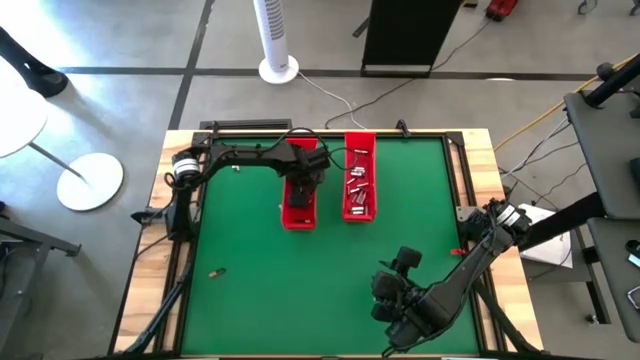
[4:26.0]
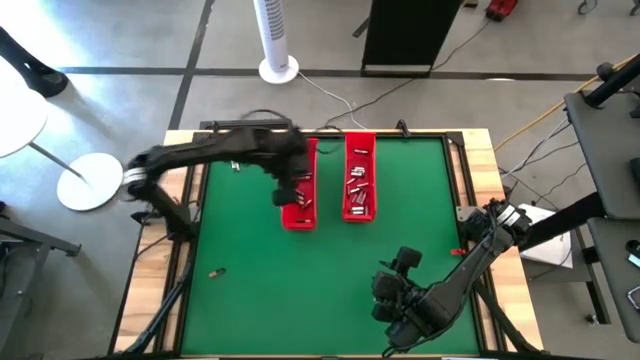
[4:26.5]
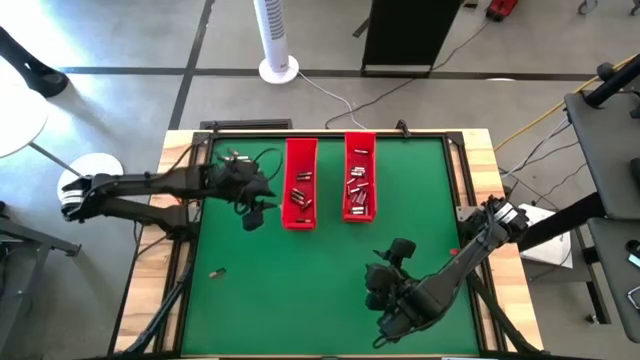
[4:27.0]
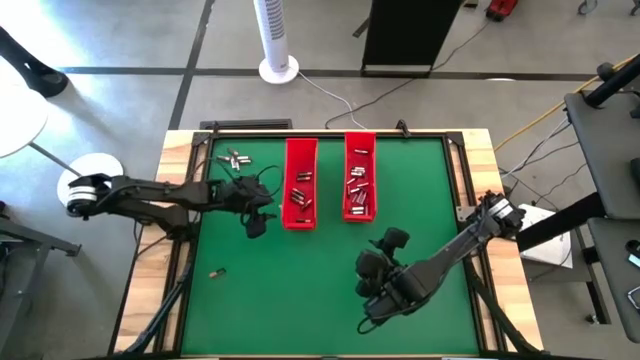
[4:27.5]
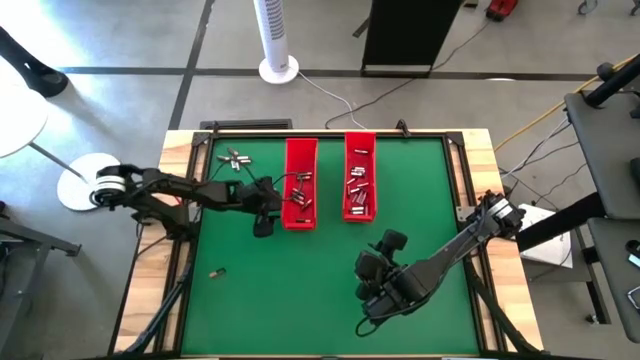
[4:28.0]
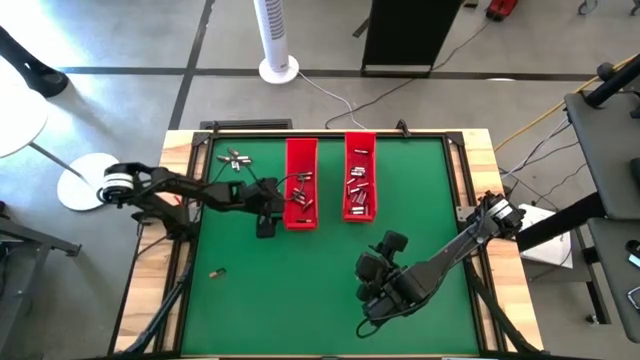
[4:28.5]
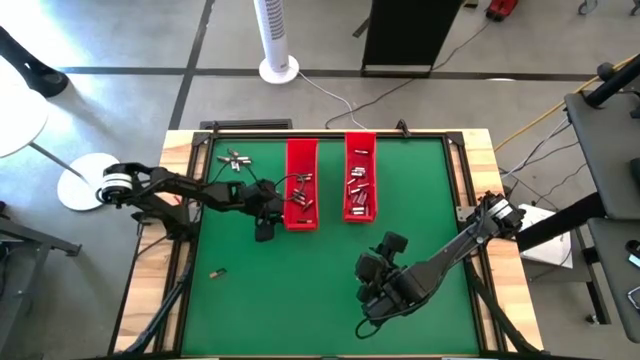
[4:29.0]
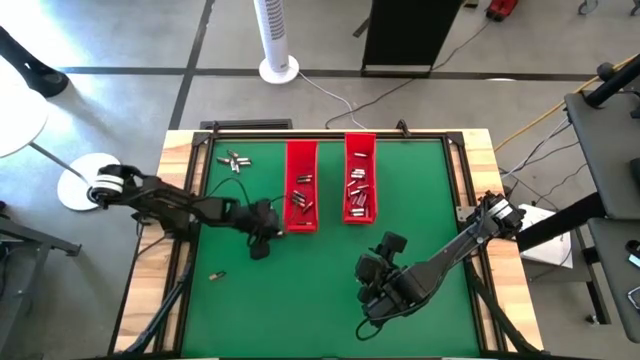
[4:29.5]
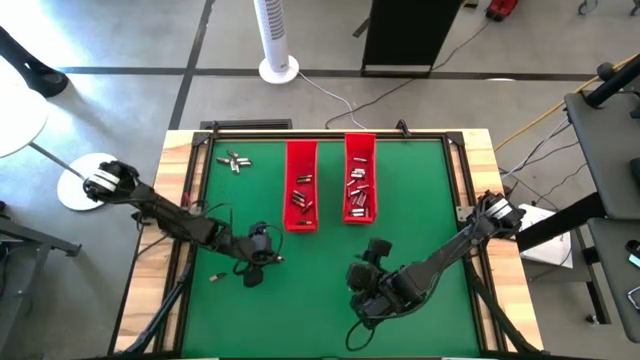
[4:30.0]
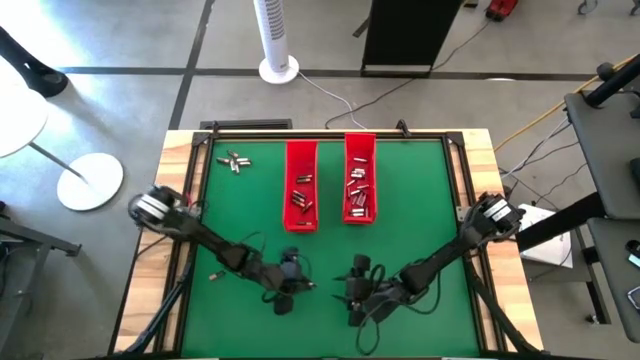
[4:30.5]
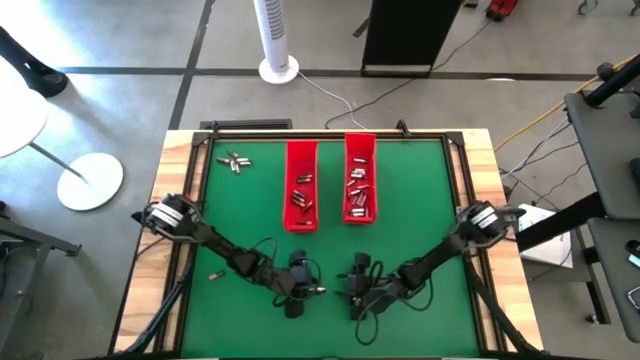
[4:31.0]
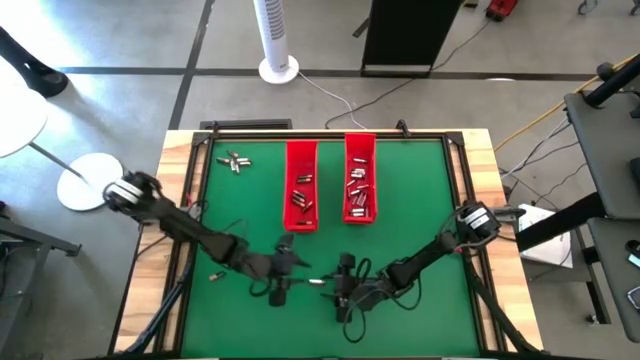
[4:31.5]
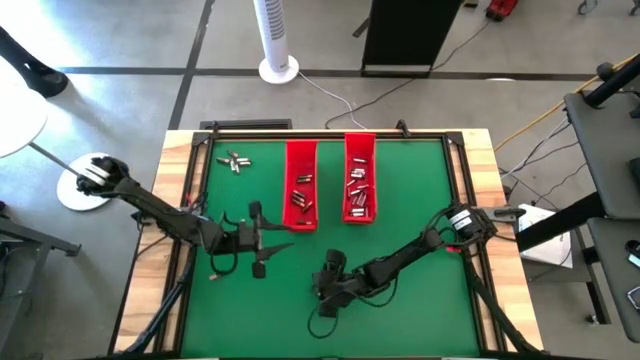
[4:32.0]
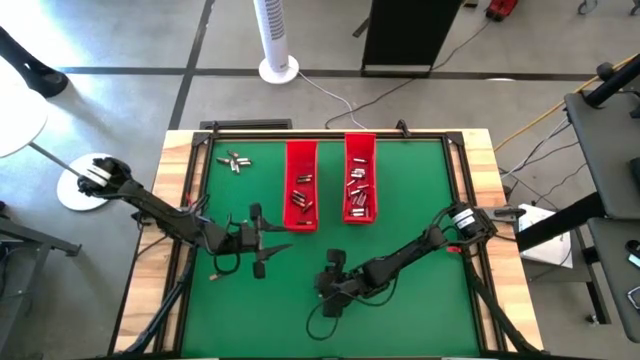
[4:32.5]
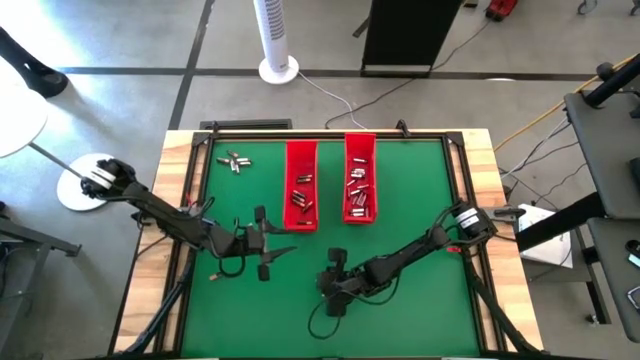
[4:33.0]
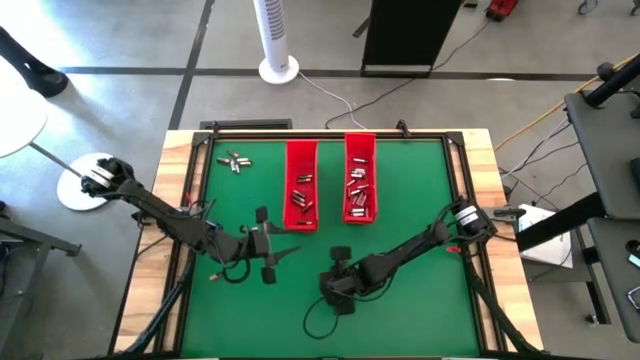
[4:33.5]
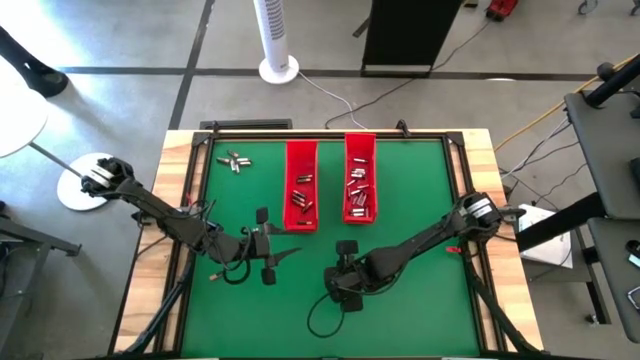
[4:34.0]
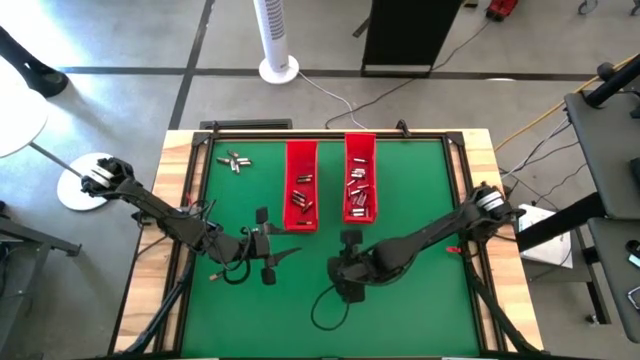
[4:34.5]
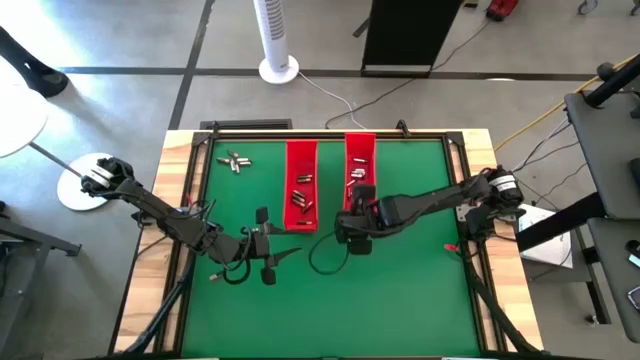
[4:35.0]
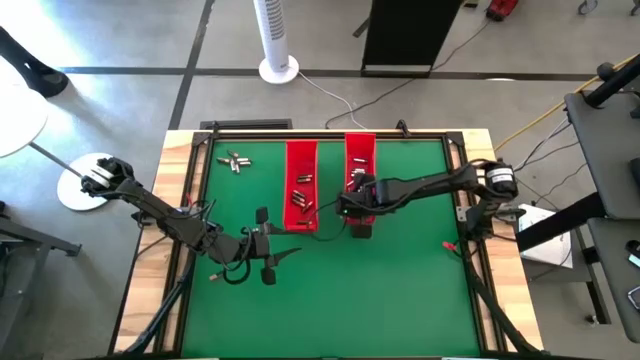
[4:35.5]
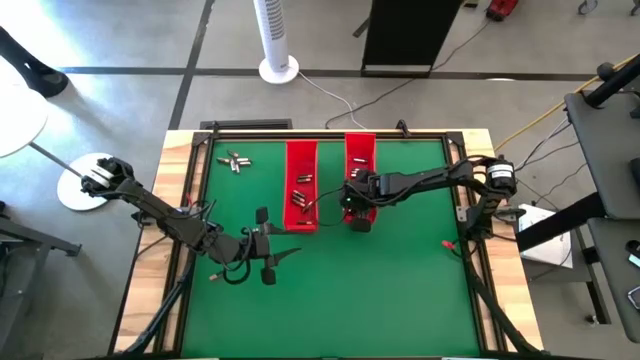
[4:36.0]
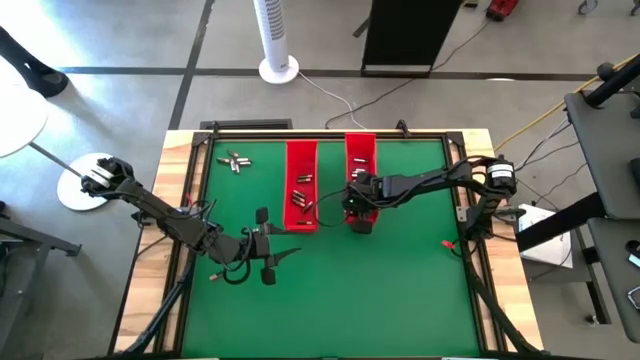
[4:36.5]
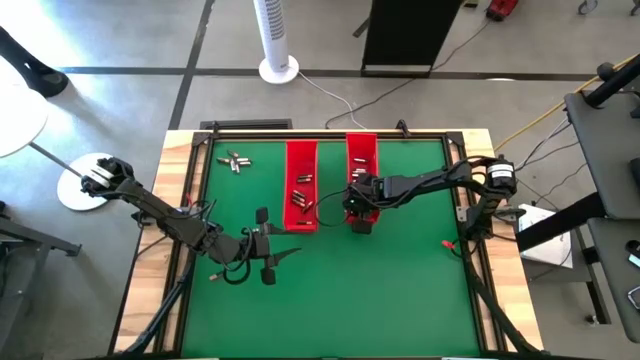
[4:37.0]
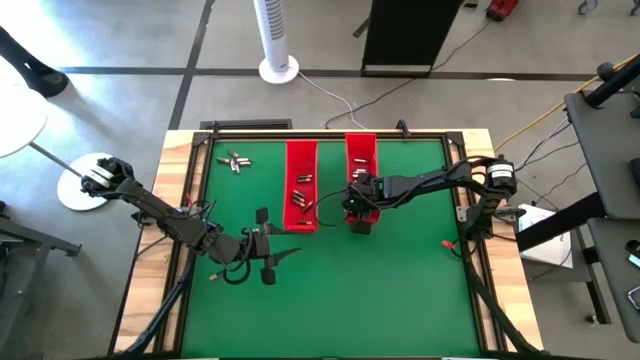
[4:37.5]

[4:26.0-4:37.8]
Task: Sort batteries
Put the silver battery into the right red bin

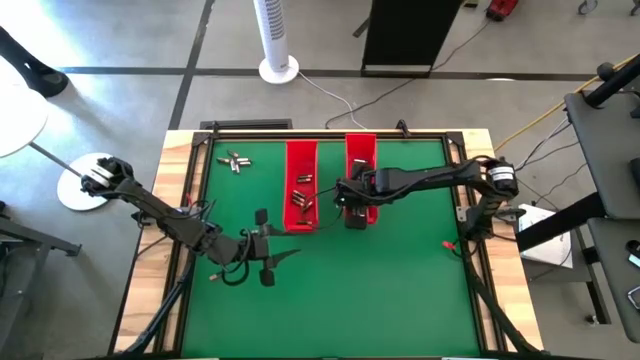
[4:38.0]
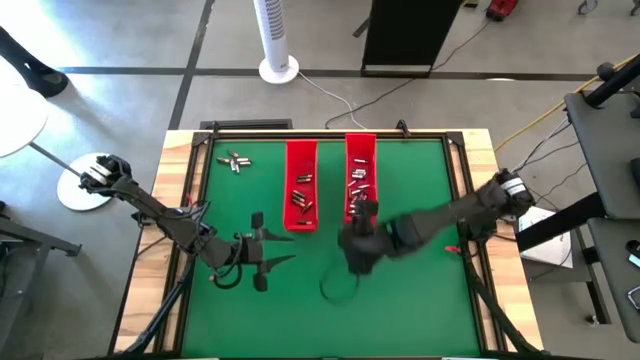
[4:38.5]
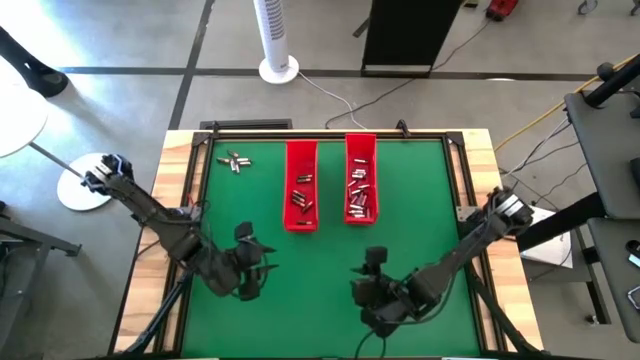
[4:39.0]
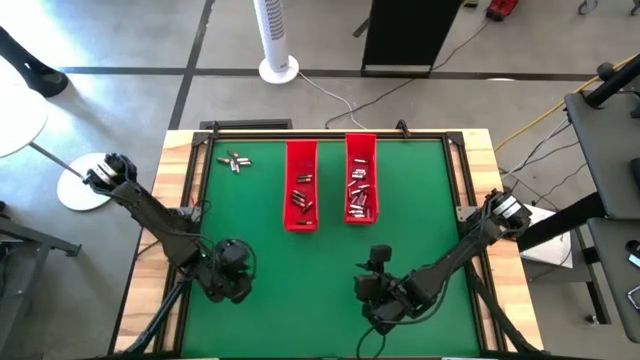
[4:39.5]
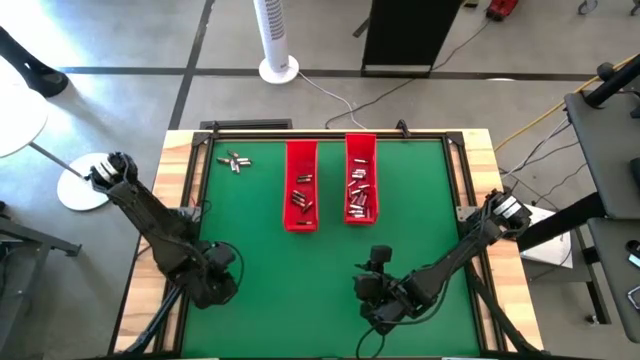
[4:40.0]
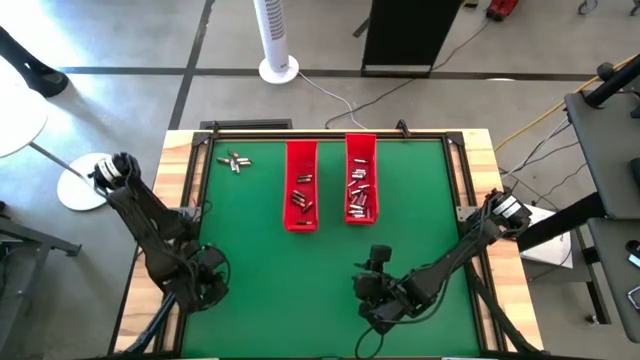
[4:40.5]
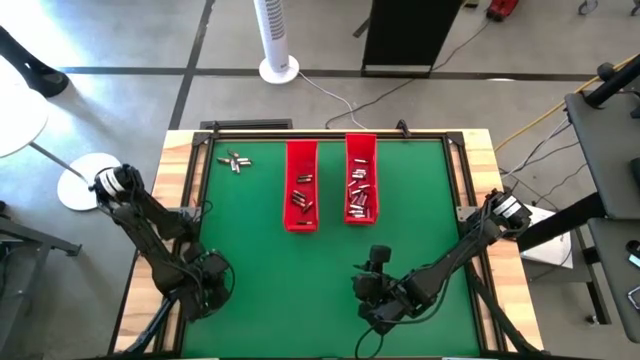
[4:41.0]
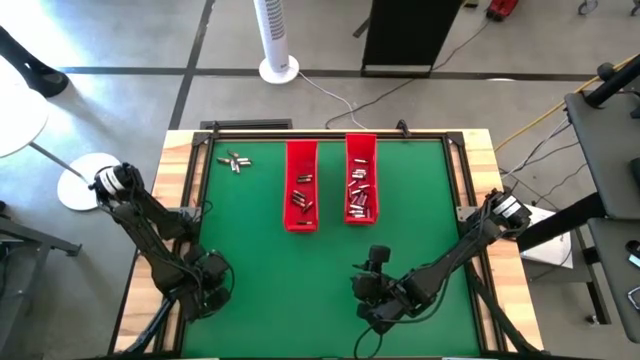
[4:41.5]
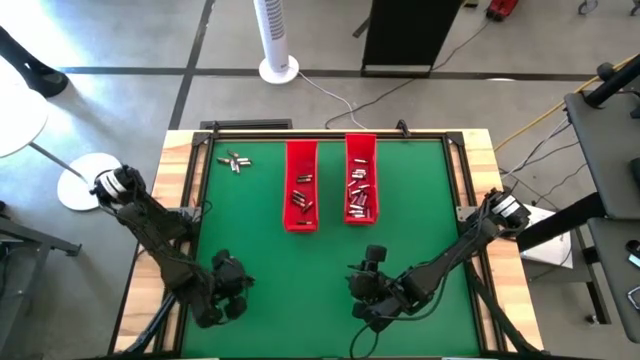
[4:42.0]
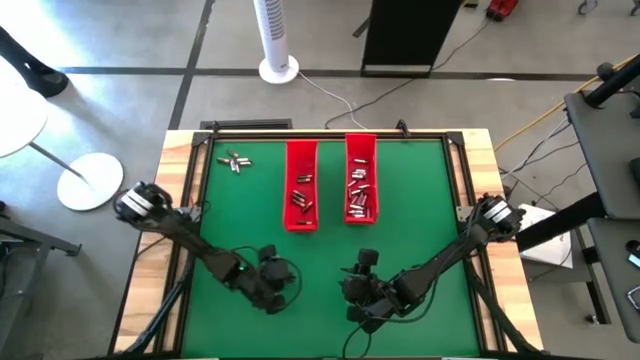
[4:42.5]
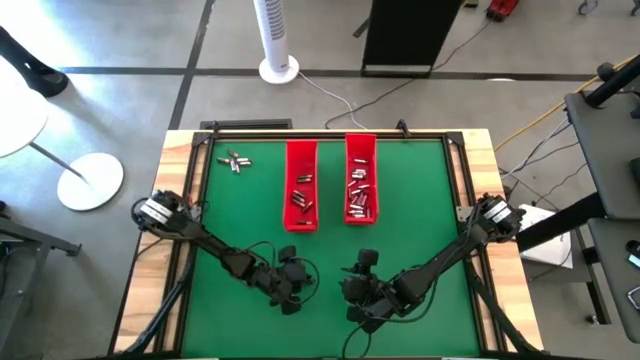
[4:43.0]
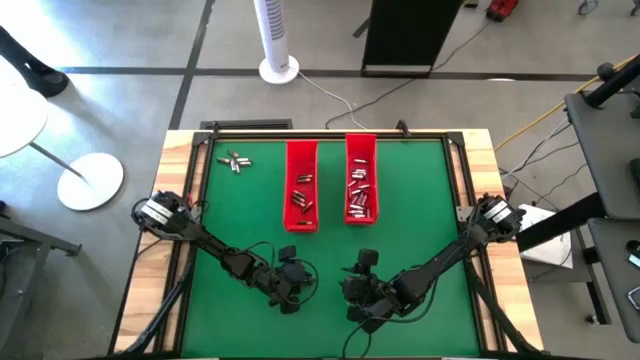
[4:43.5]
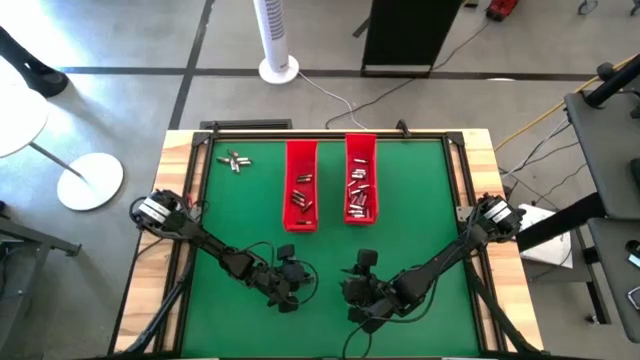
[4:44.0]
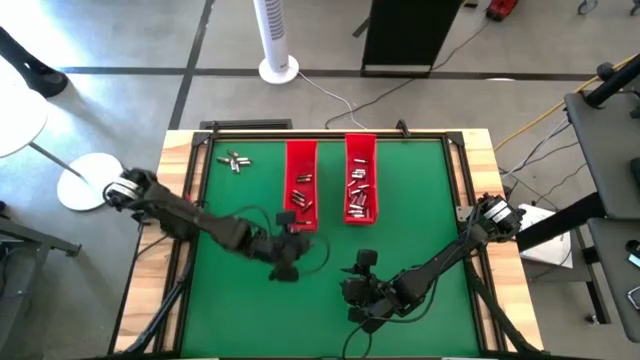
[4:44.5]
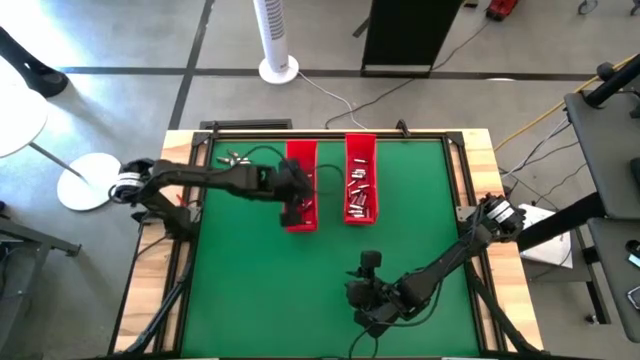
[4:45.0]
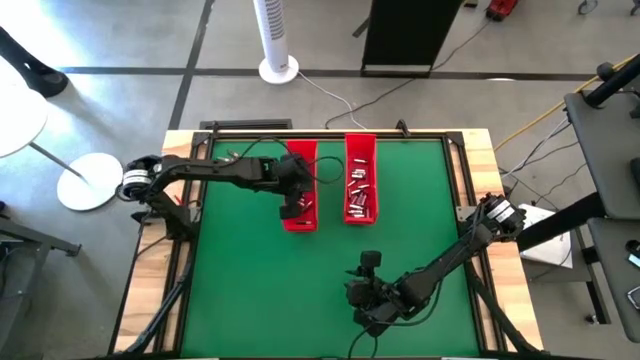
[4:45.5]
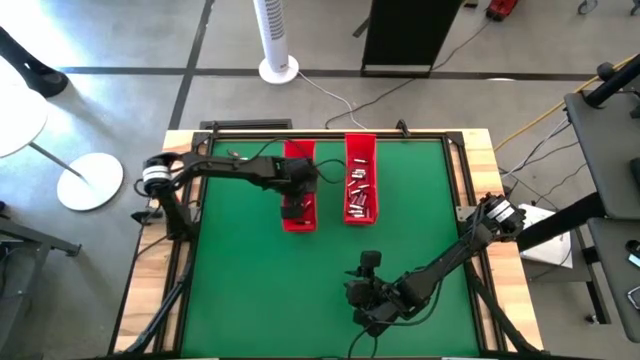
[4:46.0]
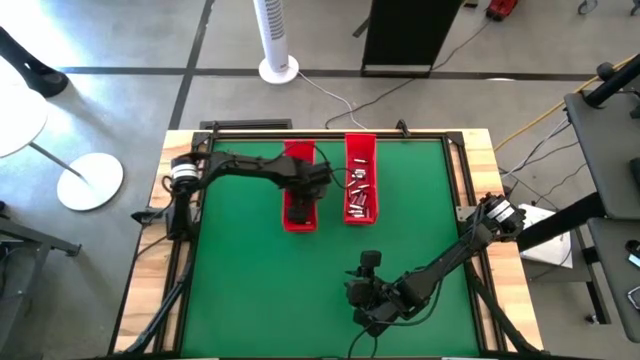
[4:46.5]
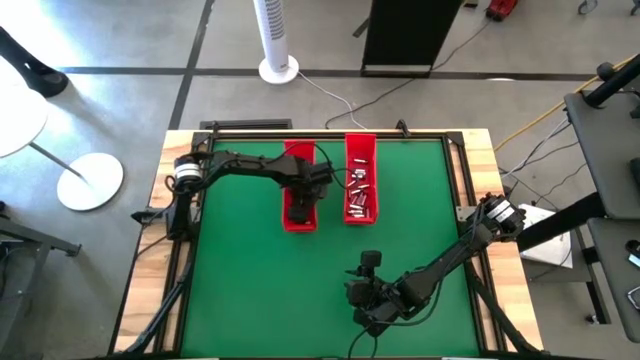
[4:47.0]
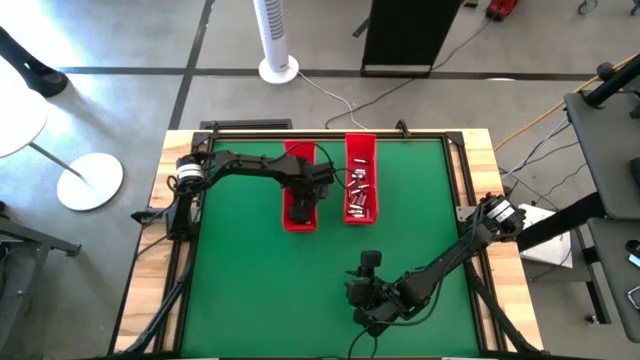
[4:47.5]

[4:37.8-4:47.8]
Put the black battery into the left red bin
